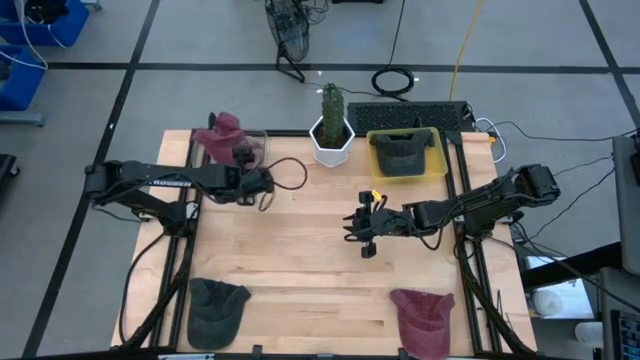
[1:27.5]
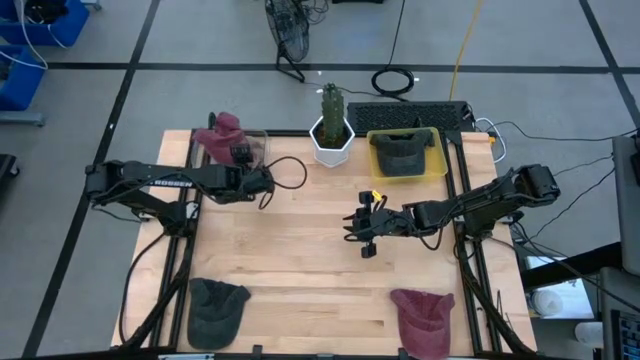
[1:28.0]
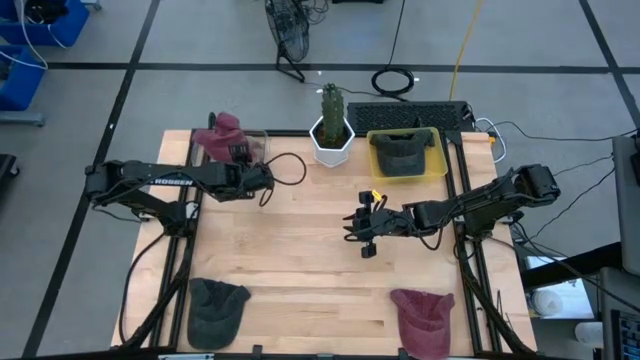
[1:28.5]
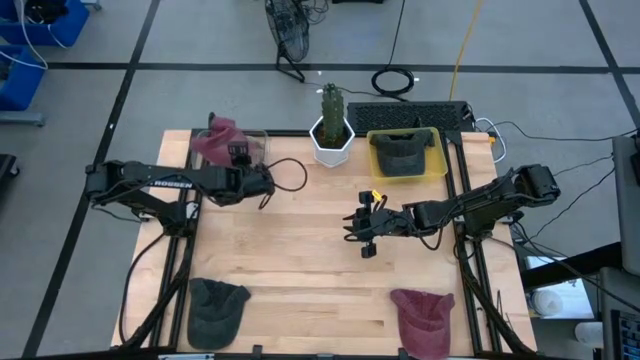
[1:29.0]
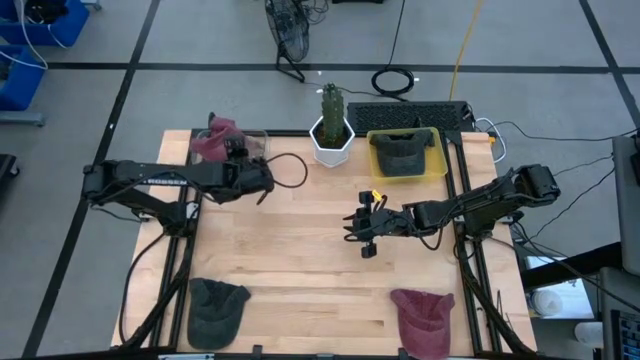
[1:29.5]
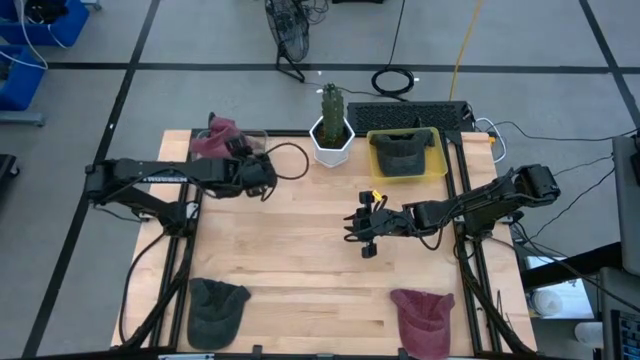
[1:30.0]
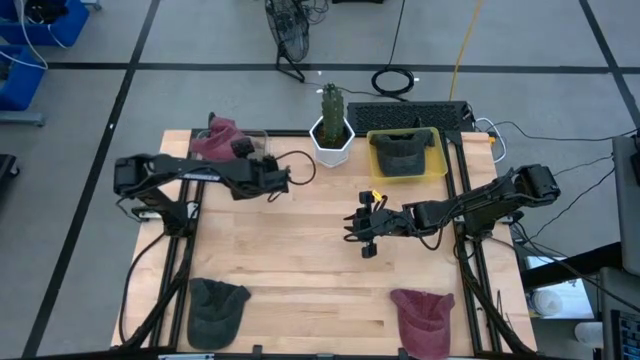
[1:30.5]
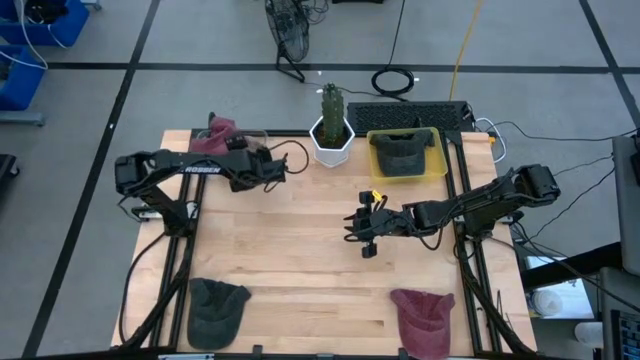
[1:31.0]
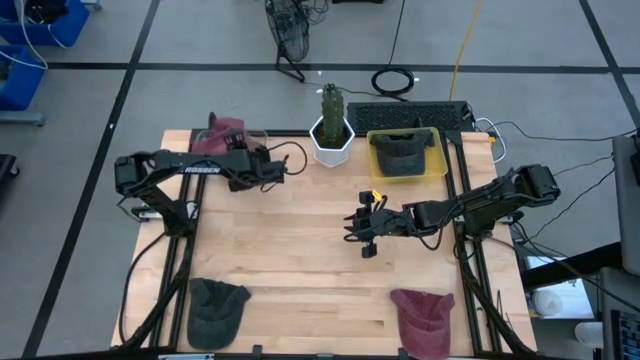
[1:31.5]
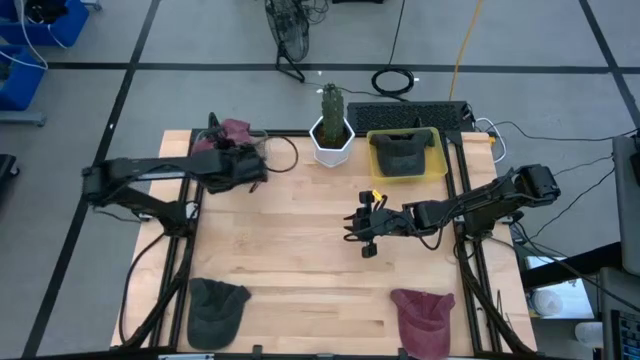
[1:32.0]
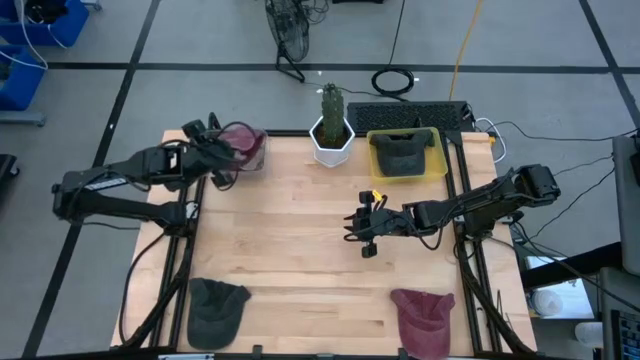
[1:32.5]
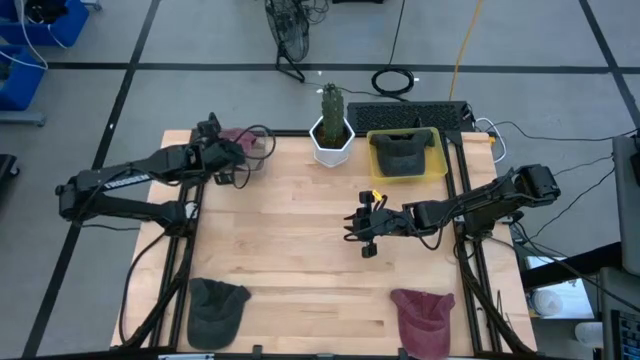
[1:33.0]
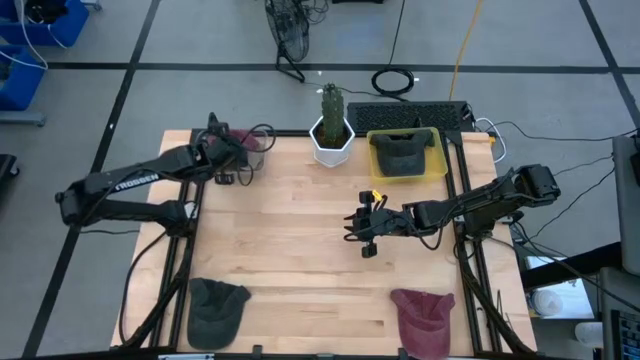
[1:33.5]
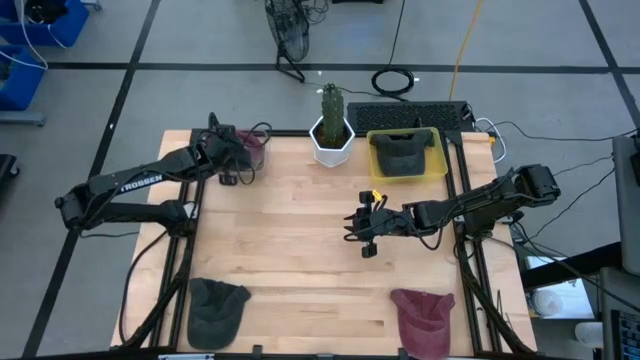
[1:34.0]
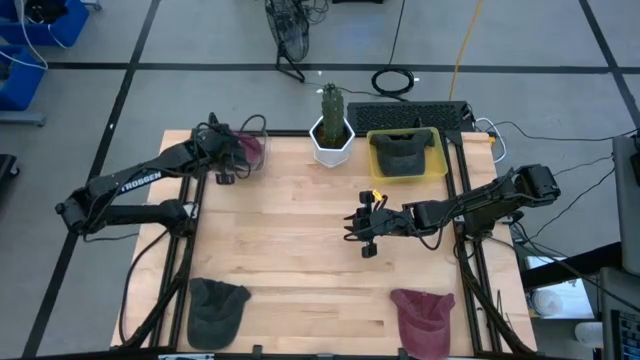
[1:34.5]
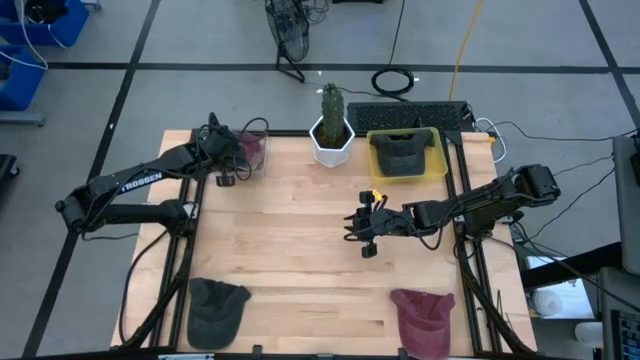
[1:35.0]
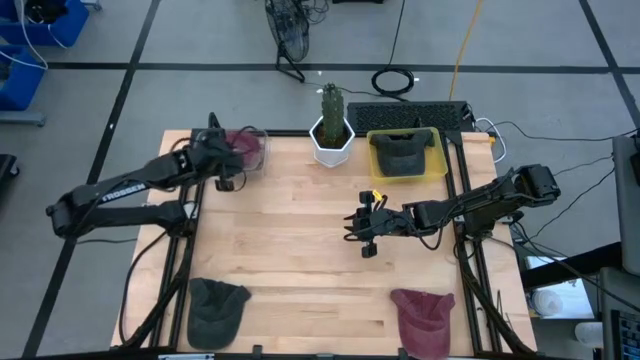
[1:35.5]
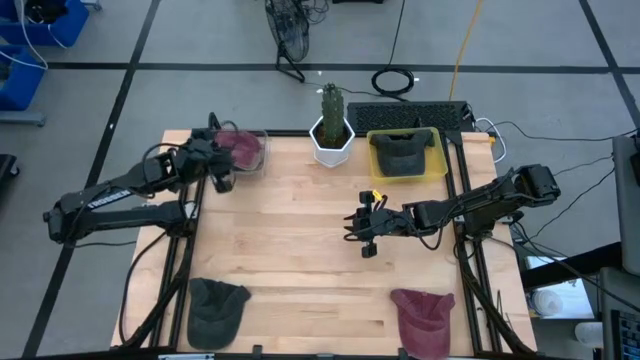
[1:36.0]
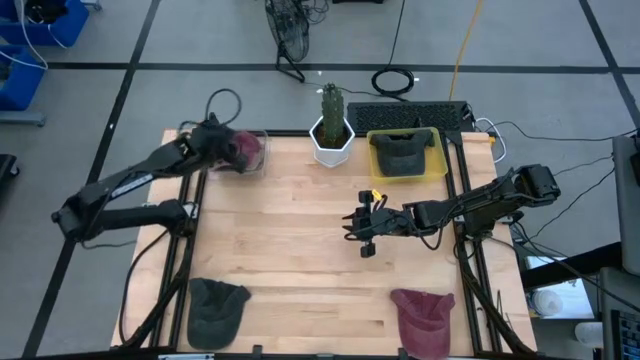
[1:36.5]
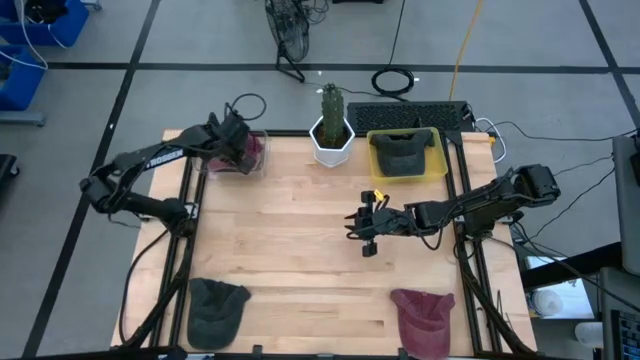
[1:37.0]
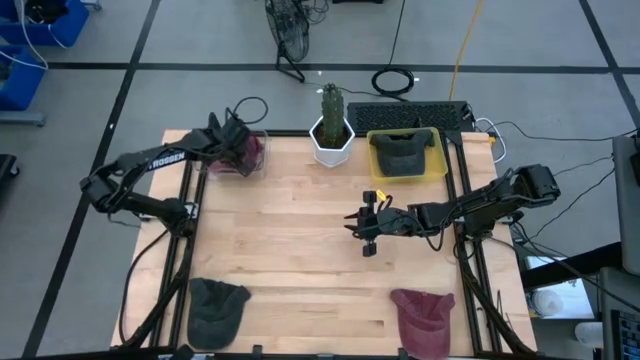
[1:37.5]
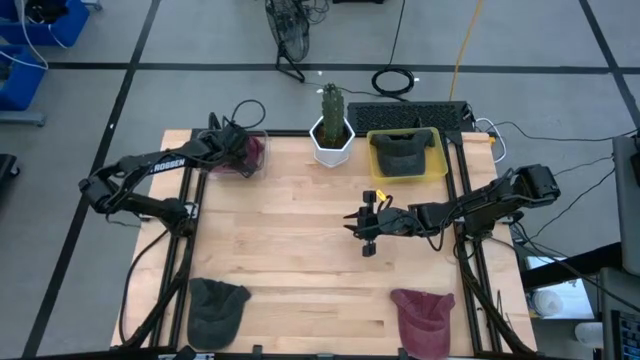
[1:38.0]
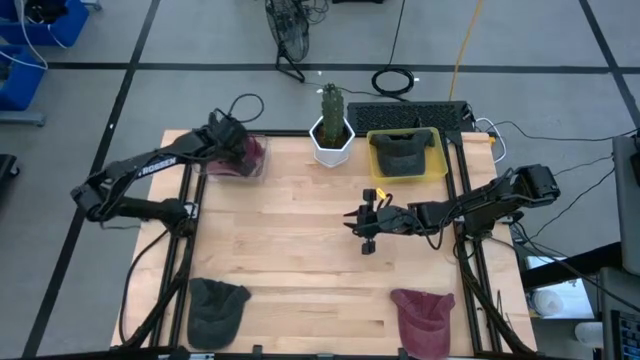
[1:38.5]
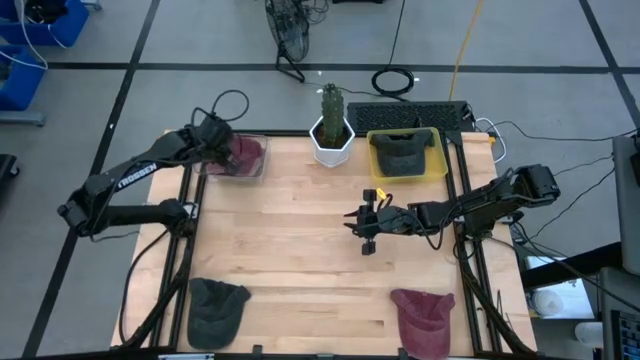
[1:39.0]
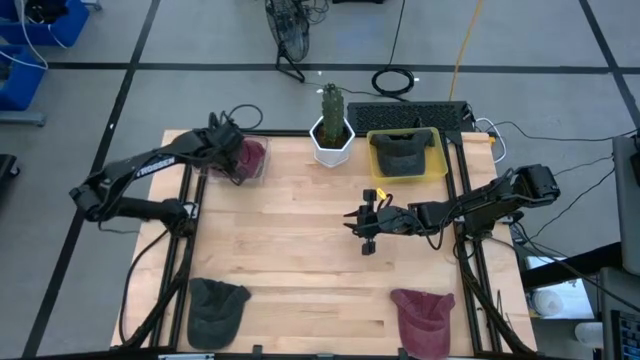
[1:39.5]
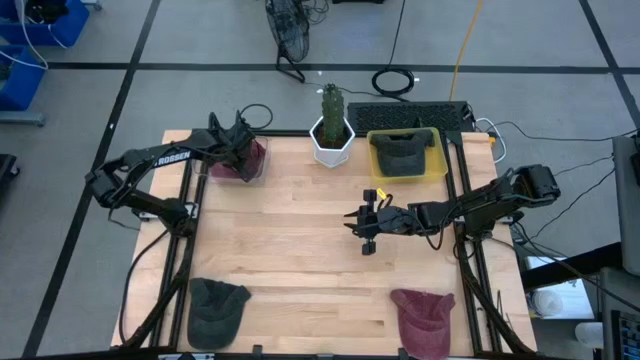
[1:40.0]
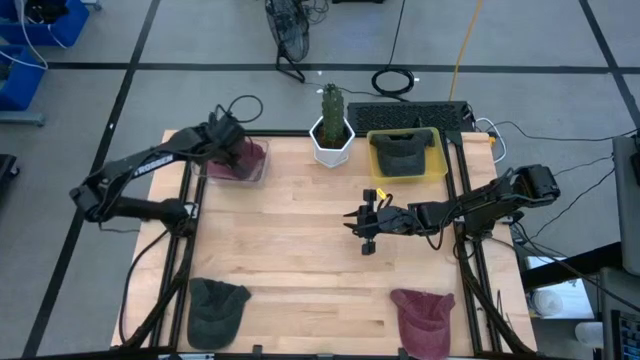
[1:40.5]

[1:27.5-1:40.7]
Task: Pick & Place hat
Put the left red cap into the transparent bin

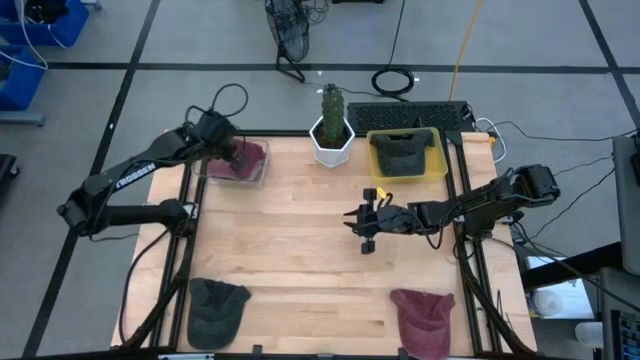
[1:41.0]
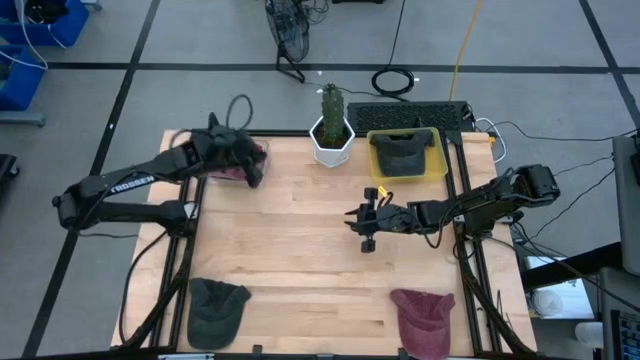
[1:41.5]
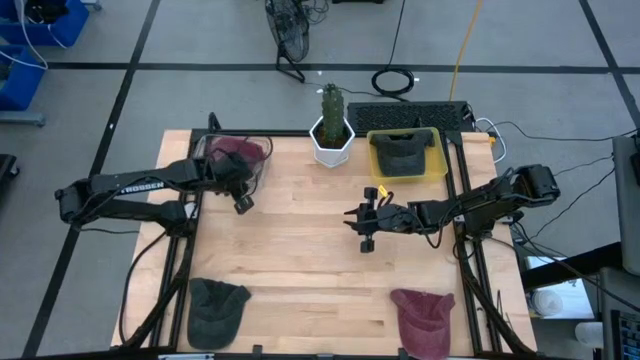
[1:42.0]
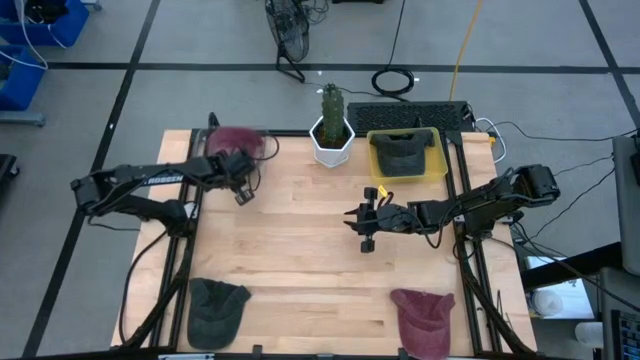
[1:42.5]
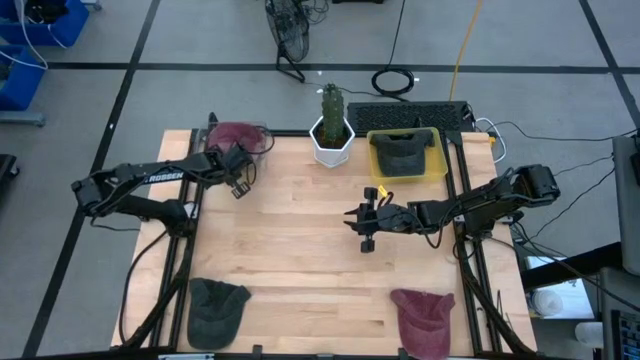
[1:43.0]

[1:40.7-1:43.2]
Adjust the transparent bin on the table

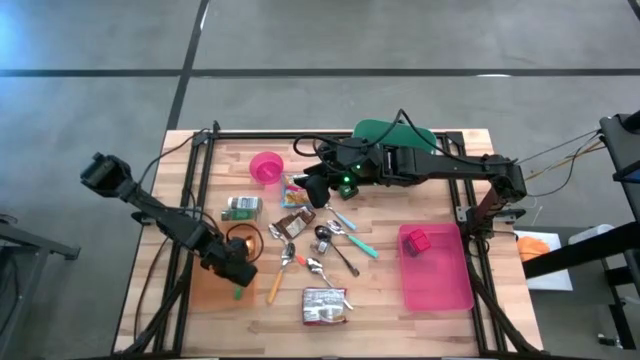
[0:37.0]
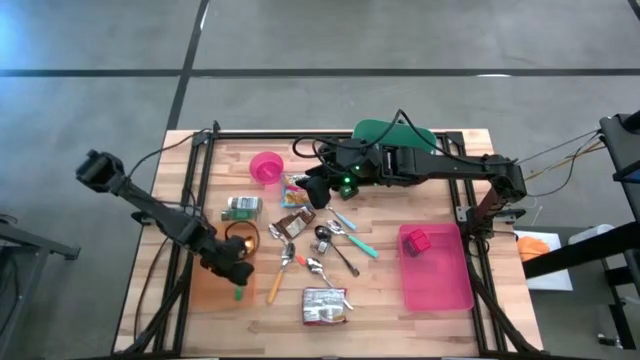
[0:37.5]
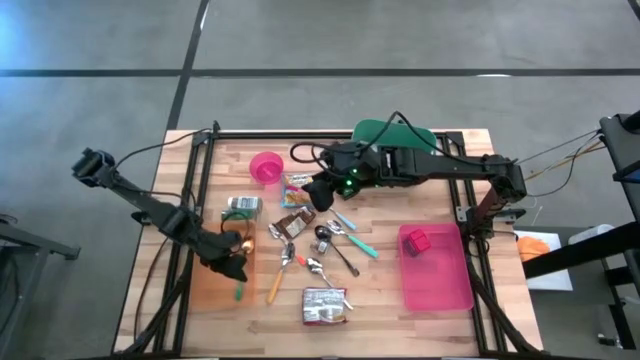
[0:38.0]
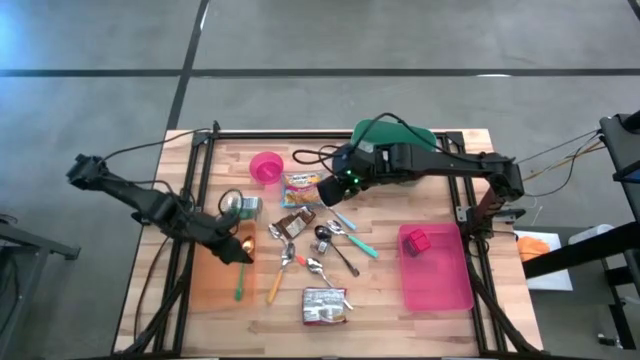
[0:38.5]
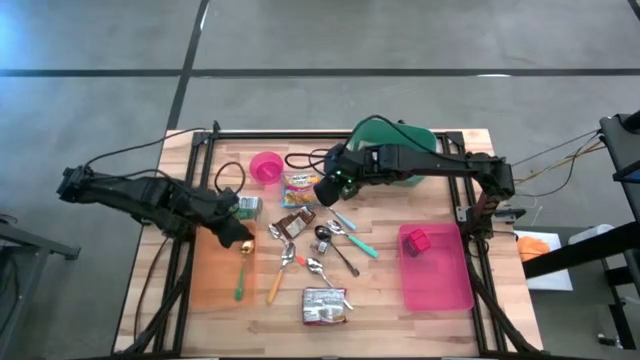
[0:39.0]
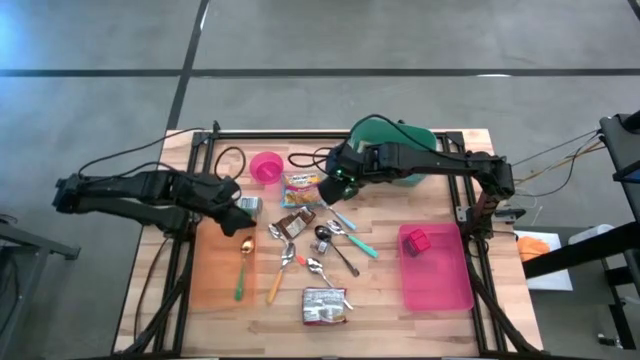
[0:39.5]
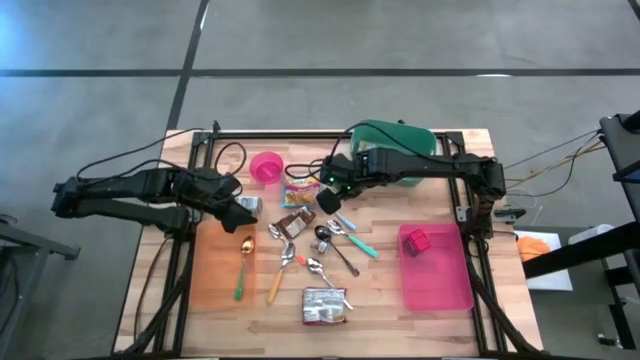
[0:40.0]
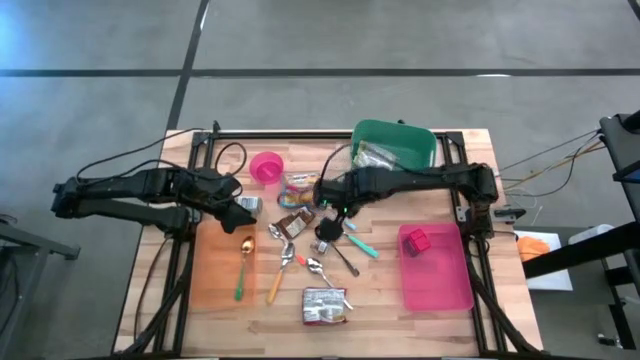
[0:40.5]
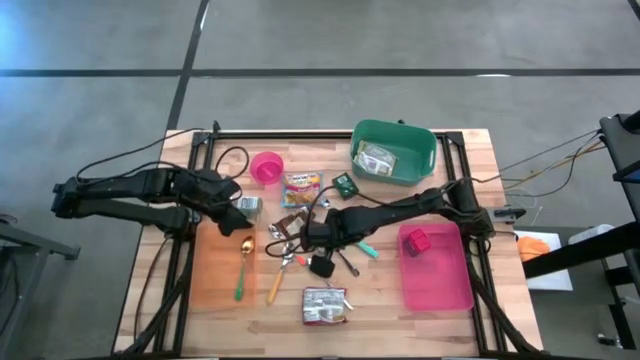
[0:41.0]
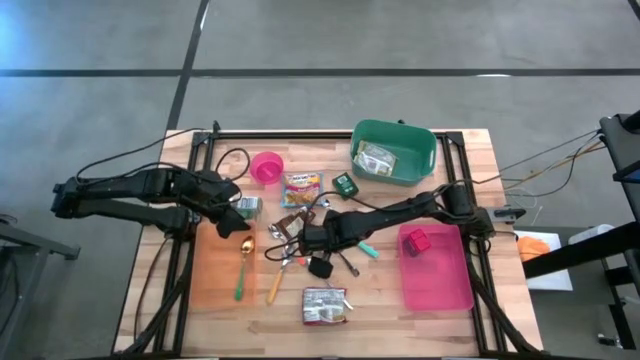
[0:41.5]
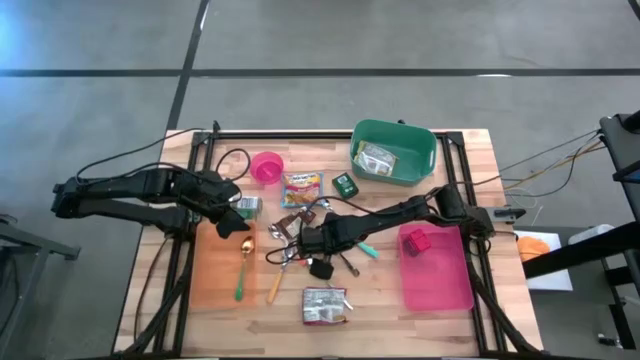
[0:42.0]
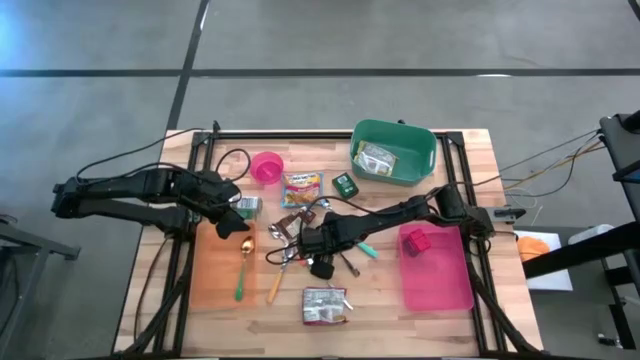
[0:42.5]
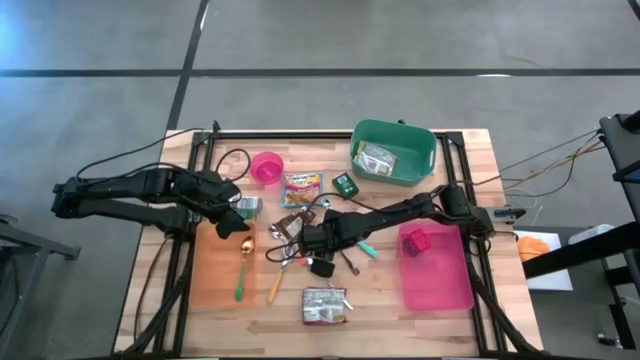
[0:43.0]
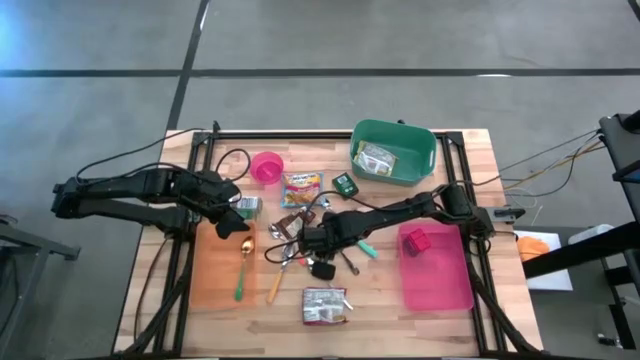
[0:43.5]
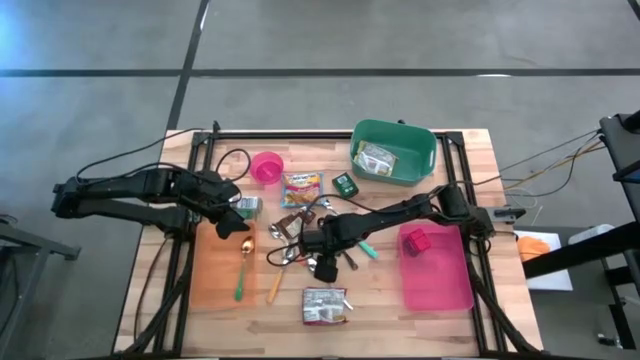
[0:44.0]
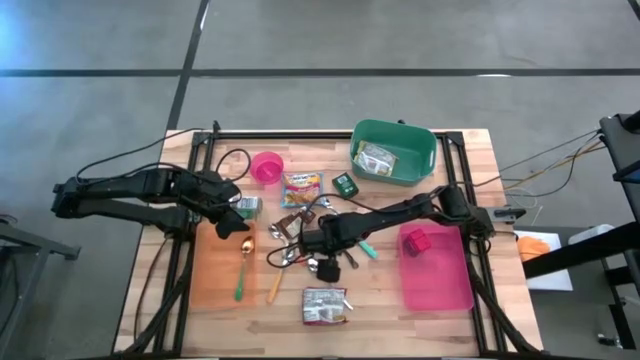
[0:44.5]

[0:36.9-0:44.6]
Task: Pick & Place Food Item
Put the brown seasoning bottle into the pink bin
